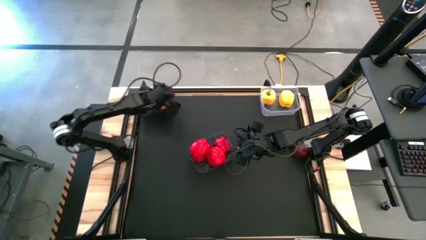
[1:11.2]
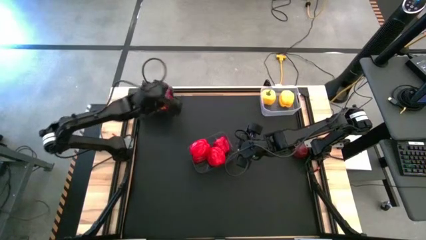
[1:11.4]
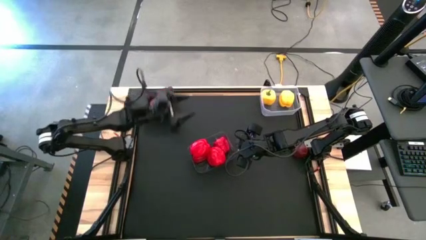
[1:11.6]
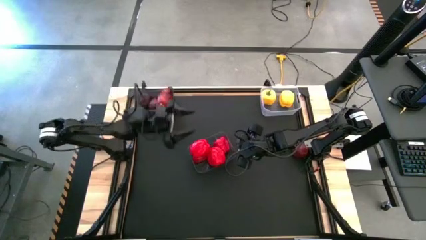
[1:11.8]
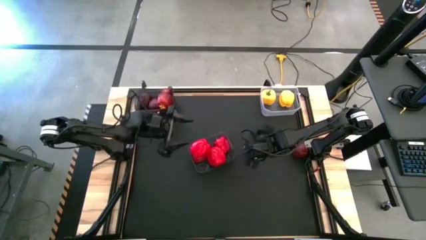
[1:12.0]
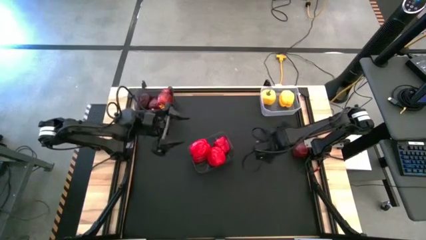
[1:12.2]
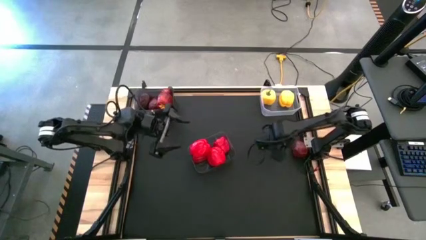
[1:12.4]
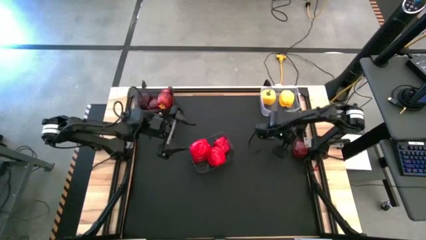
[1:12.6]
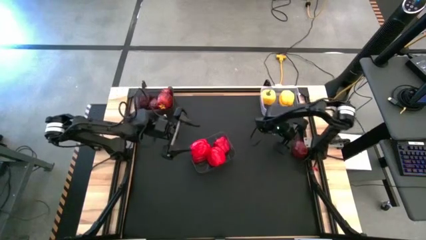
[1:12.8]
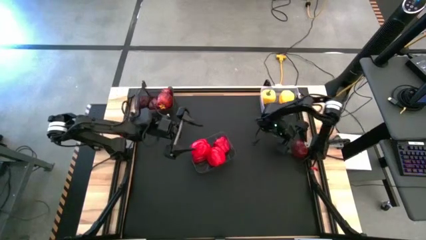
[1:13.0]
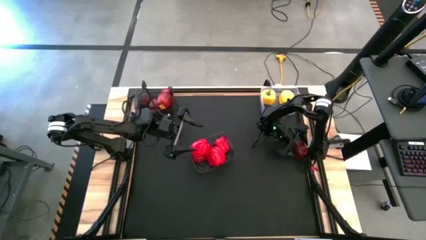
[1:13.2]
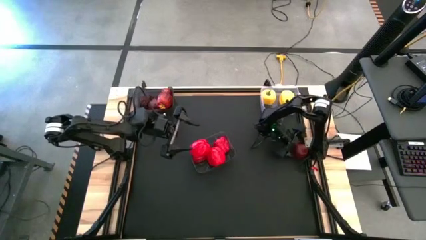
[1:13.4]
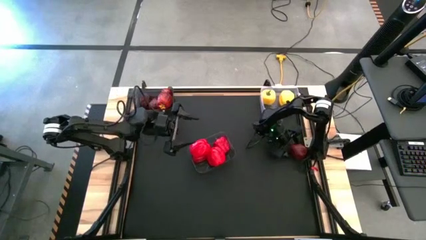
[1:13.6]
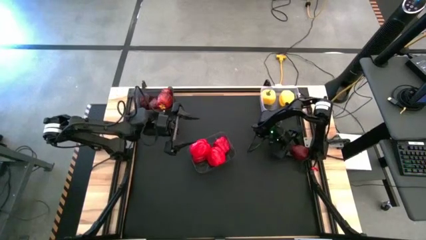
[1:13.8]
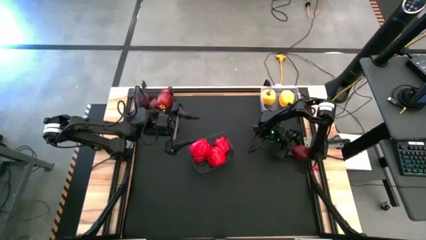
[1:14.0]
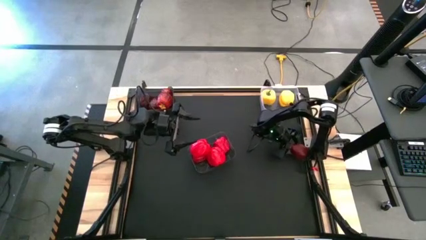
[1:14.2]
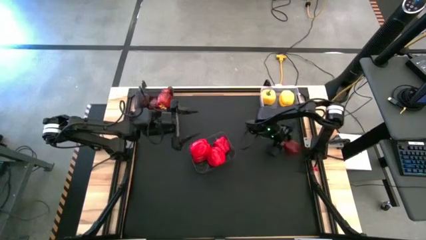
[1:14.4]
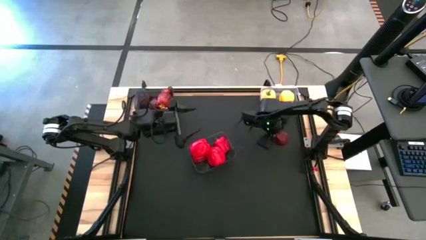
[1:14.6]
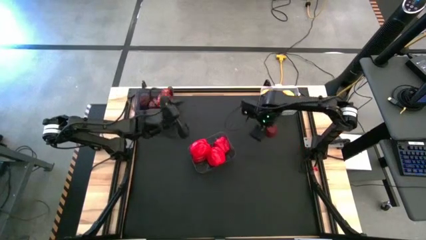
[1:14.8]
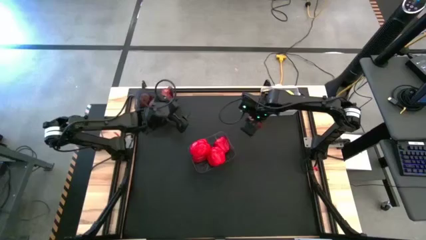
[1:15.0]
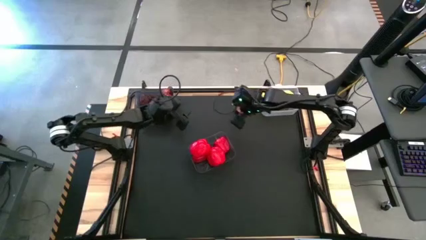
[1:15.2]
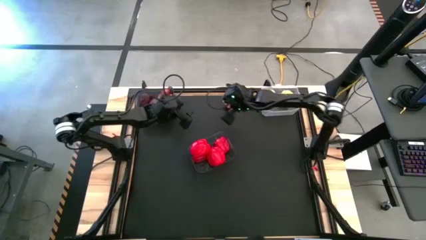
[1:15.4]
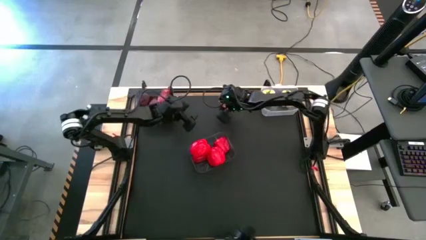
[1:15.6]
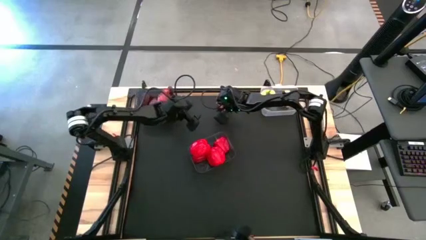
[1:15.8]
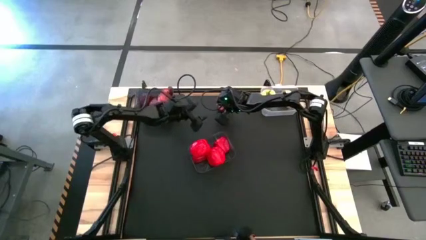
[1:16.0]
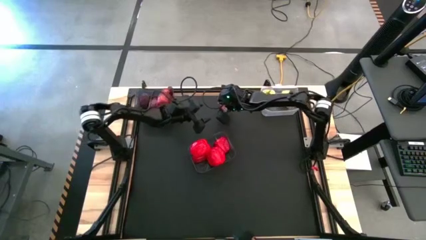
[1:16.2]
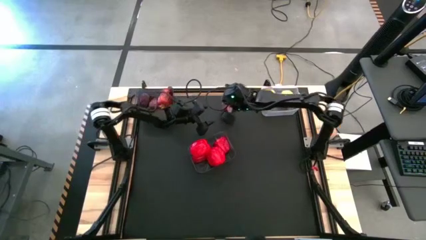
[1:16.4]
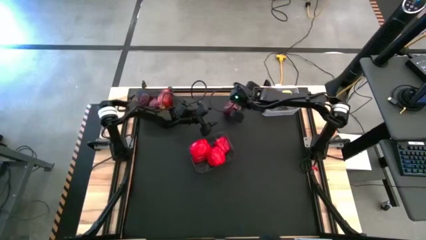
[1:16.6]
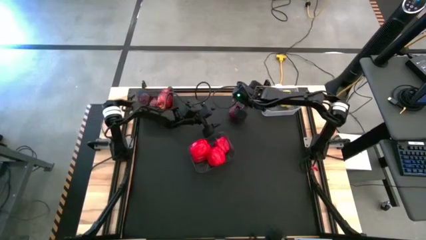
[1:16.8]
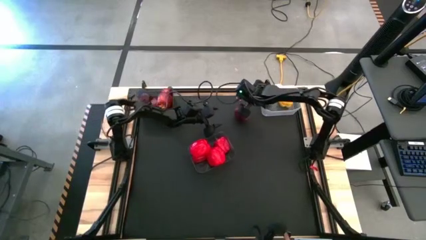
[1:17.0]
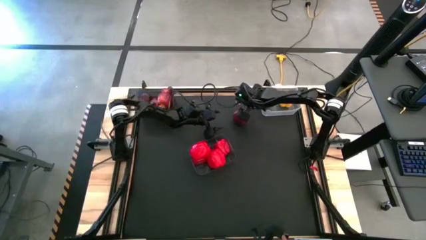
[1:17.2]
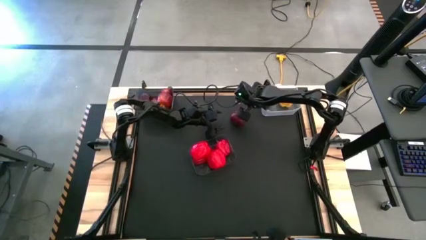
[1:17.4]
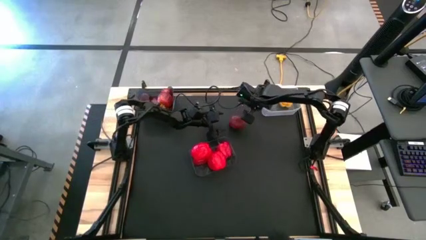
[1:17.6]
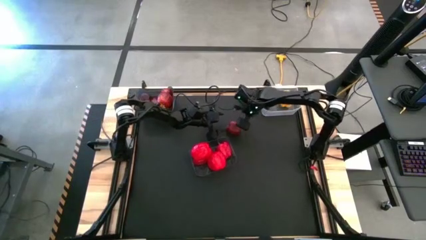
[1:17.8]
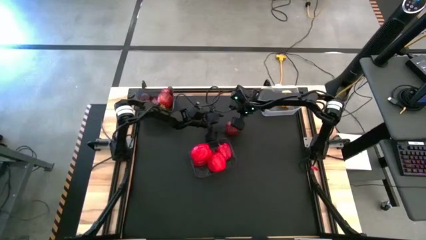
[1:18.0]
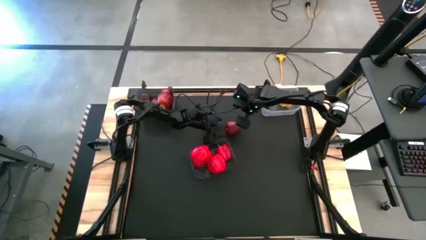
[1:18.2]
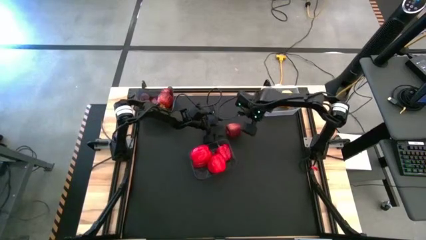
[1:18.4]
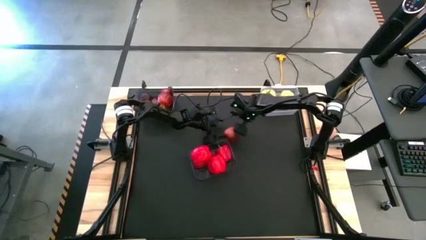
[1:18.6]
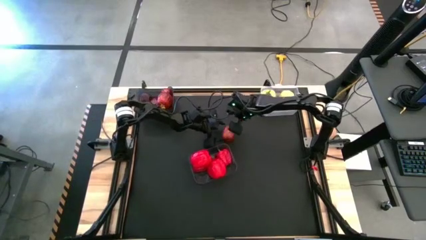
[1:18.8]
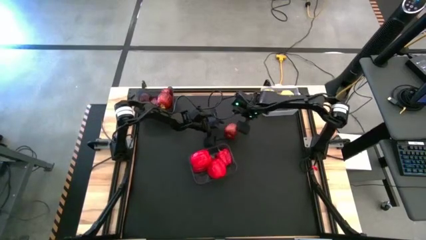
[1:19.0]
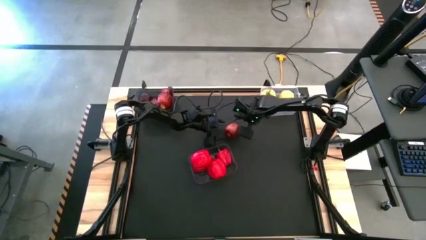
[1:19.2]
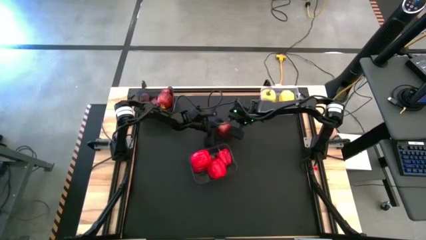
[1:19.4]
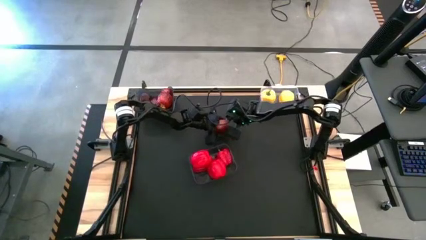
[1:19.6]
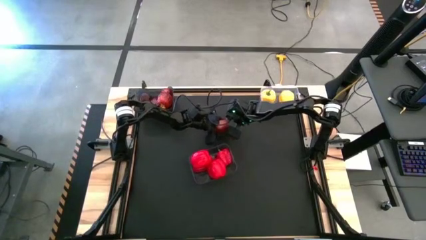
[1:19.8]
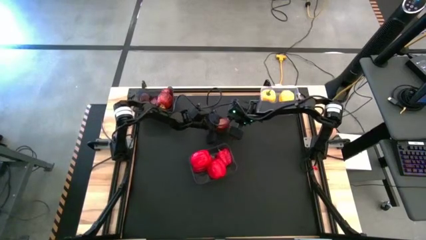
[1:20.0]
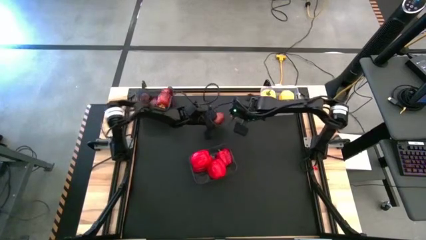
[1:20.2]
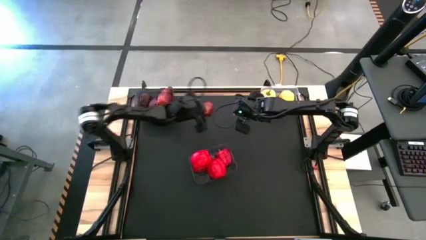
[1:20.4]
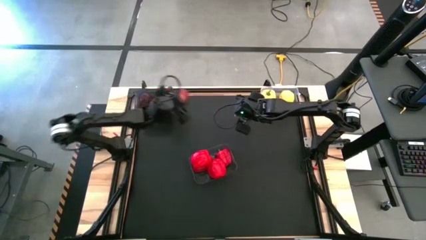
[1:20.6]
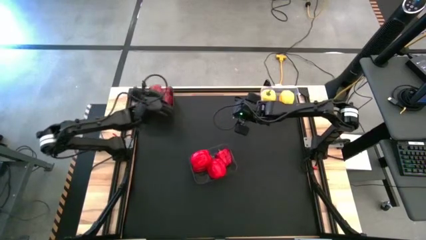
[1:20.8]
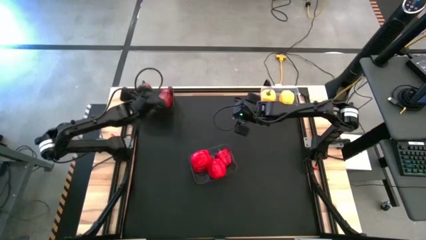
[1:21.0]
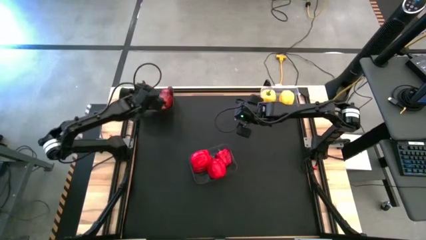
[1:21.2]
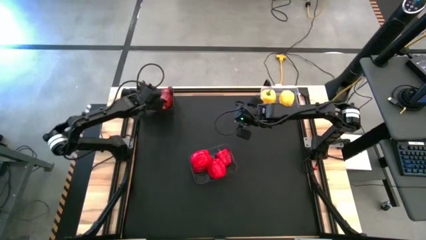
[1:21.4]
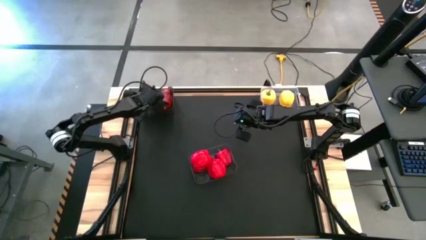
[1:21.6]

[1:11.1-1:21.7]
Task: Sort produce into baskets
Put the red apple into the top black bin

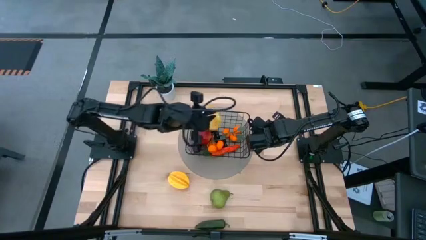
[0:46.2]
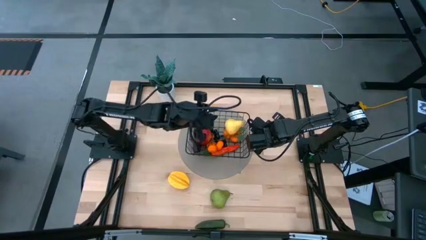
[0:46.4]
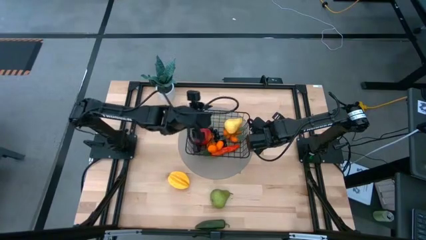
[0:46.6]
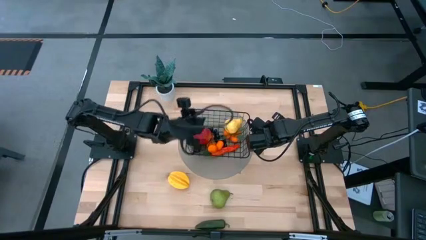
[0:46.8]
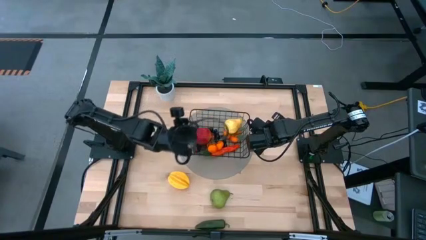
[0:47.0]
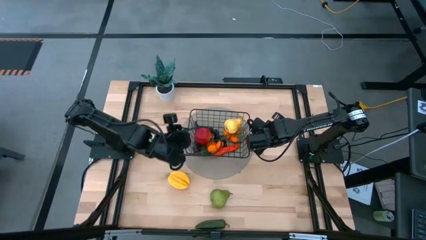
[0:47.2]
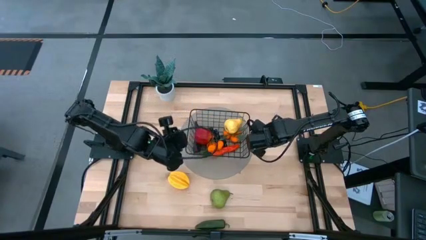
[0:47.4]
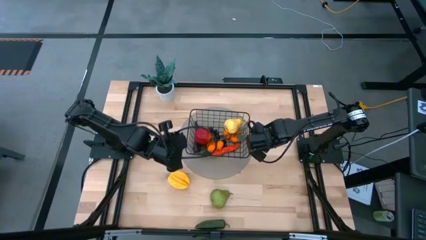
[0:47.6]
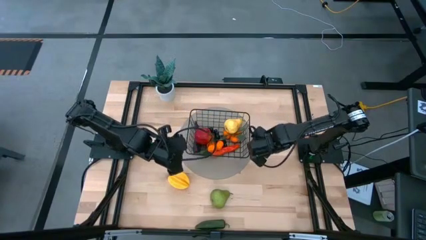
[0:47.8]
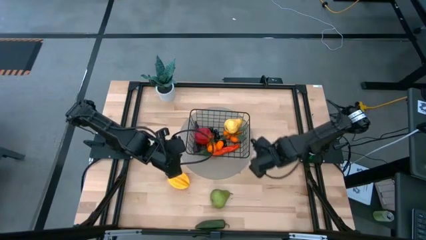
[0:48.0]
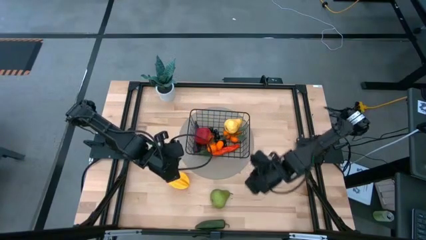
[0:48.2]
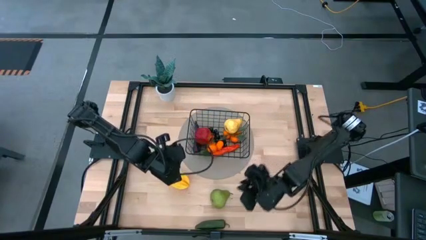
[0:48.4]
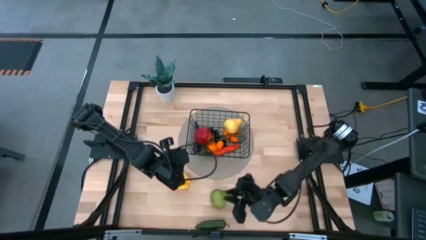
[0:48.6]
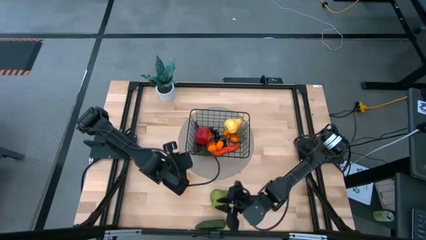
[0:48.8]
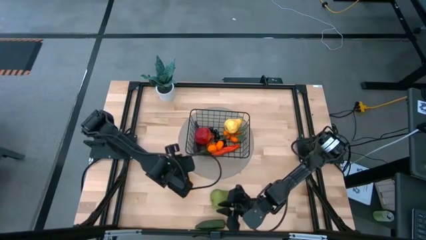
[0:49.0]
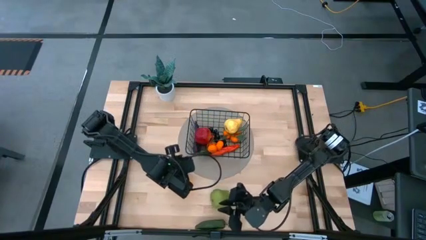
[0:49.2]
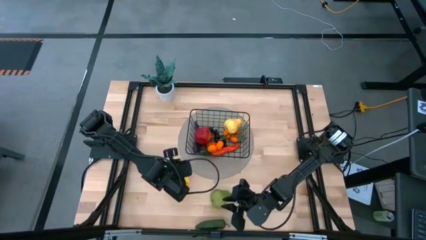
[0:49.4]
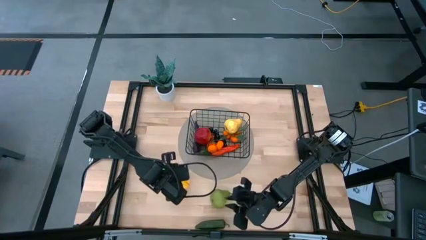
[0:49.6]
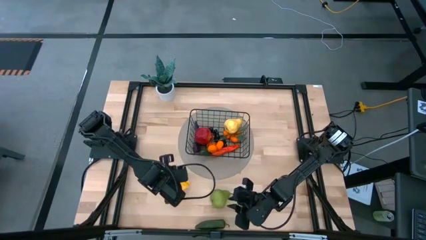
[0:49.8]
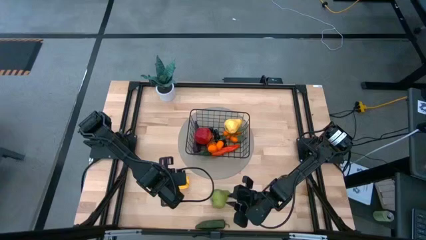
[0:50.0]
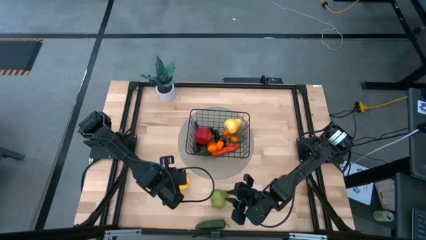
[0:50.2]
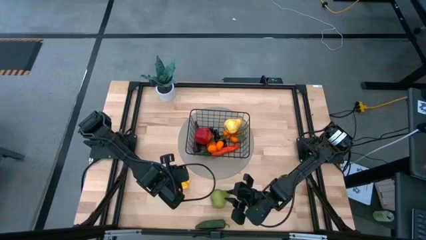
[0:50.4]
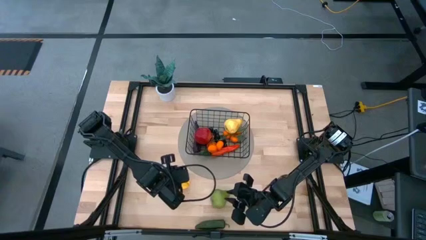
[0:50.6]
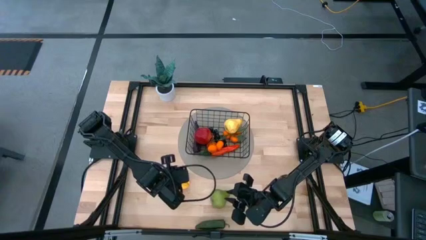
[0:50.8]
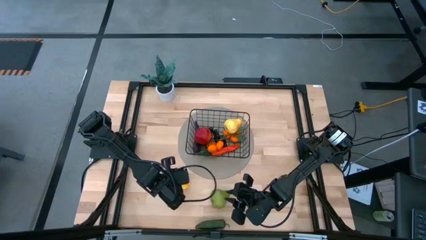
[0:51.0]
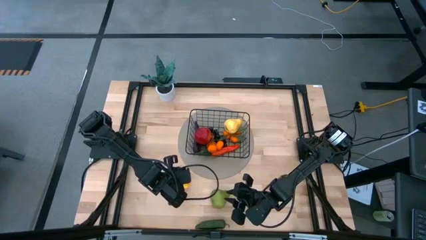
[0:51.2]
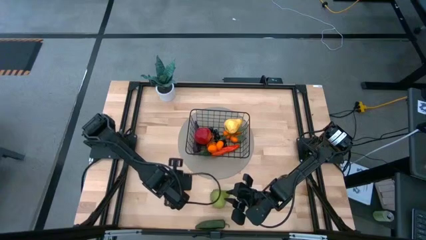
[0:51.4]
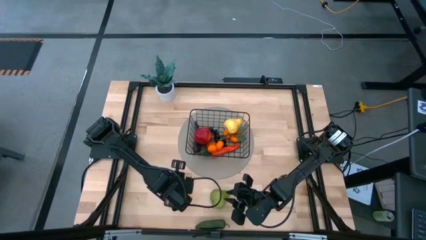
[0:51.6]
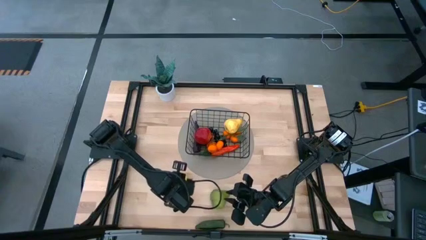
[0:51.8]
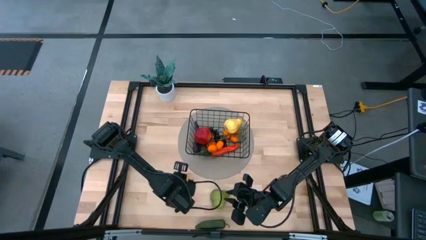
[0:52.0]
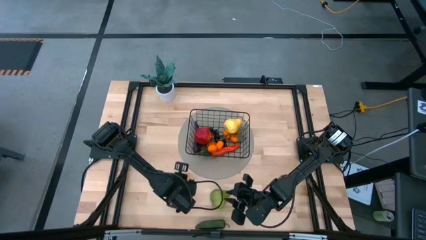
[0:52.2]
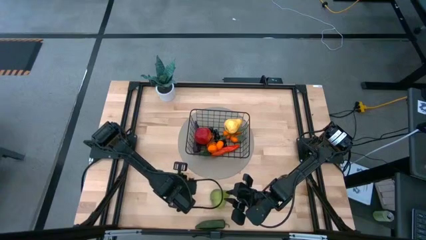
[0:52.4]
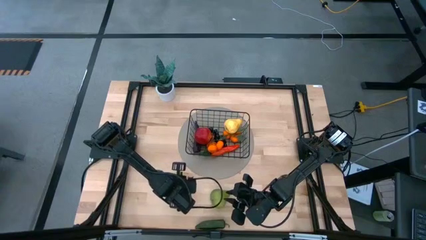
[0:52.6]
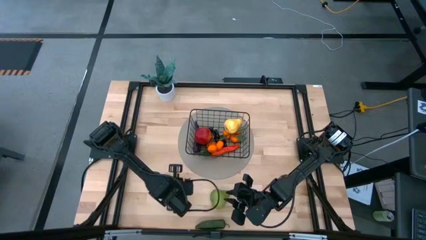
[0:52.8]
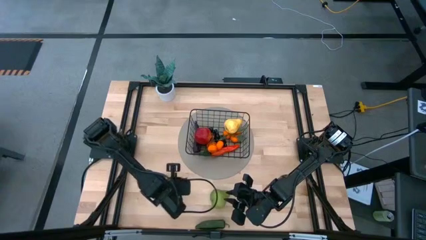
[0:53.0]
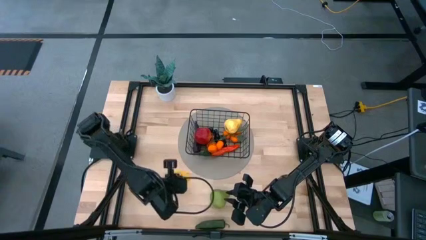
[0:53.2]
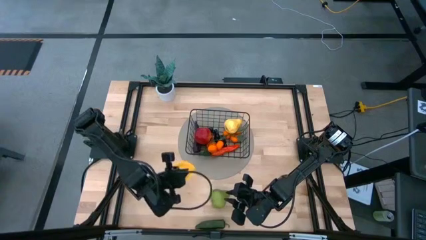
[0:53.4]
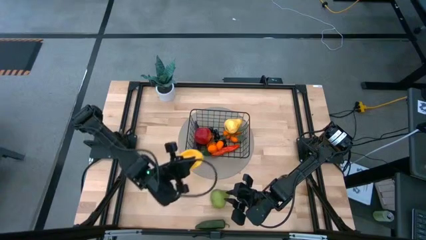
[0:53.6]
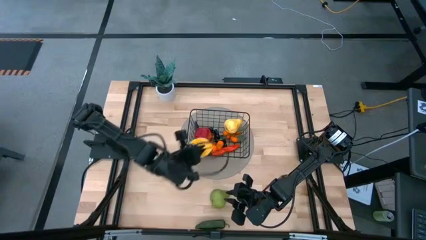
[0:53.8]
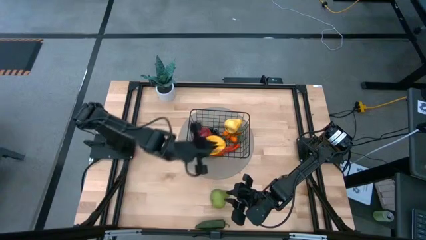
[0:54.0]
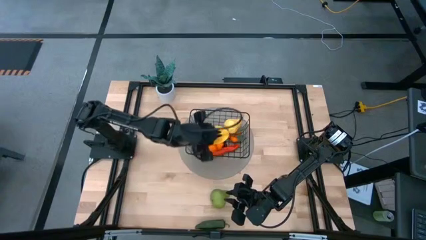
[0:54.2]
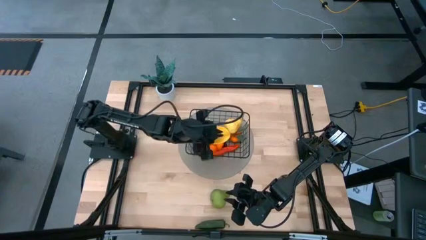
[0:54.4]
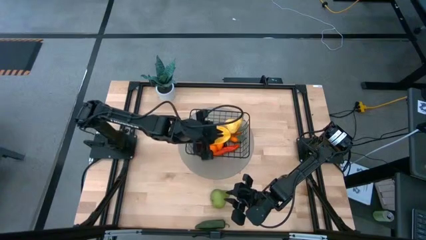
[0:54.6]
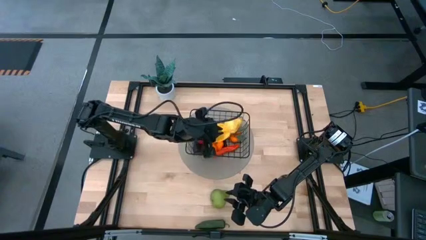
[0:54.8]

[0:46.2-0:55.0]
Task: Build produce basket
Put the yellow starfruit into the black wire basket
